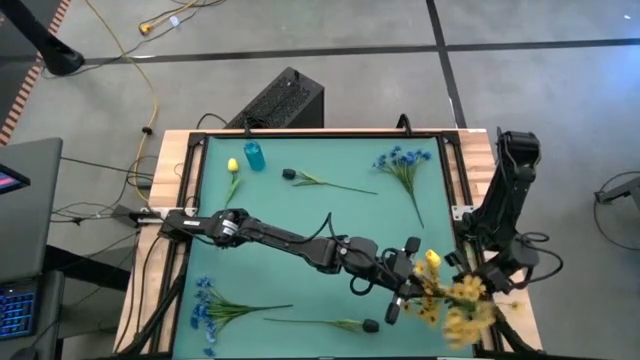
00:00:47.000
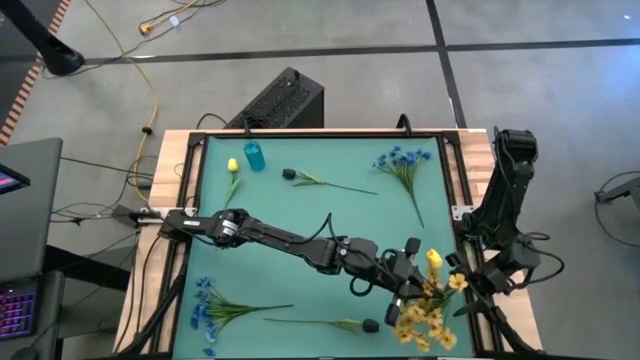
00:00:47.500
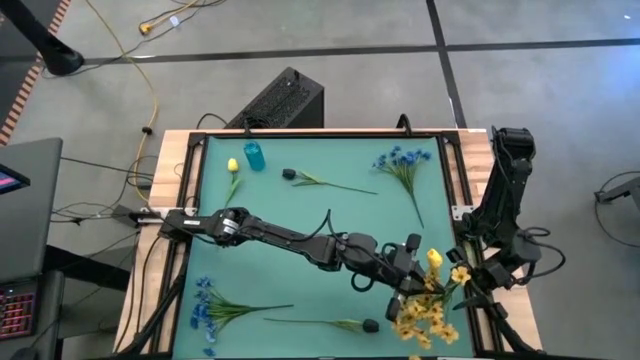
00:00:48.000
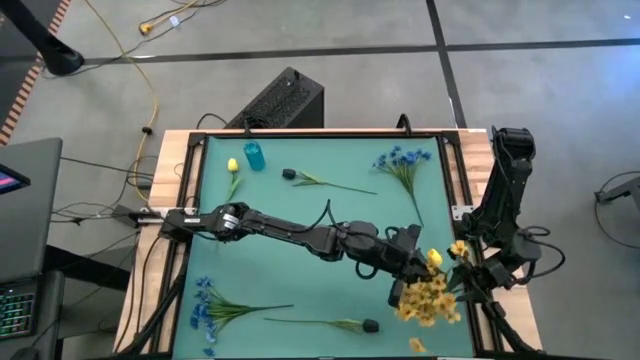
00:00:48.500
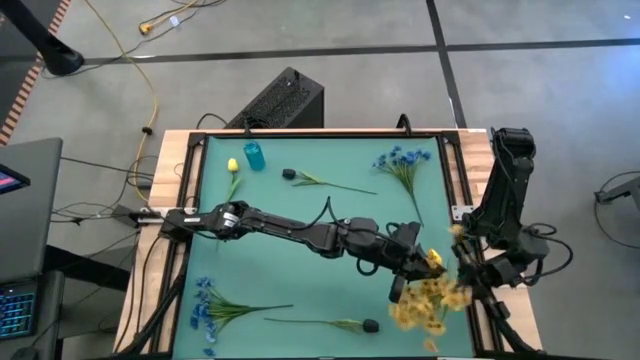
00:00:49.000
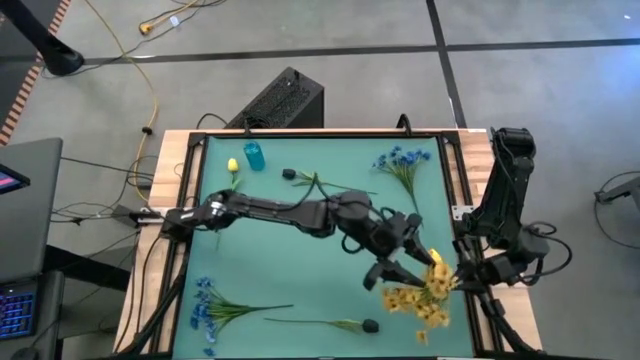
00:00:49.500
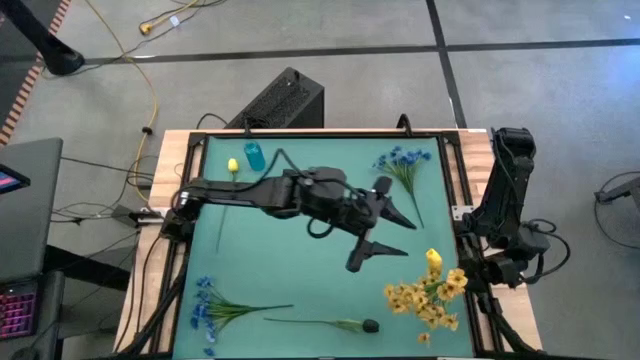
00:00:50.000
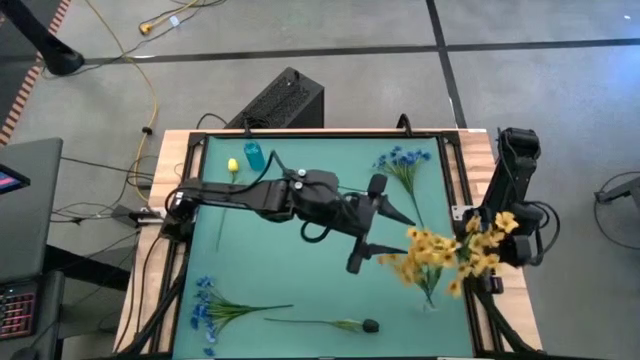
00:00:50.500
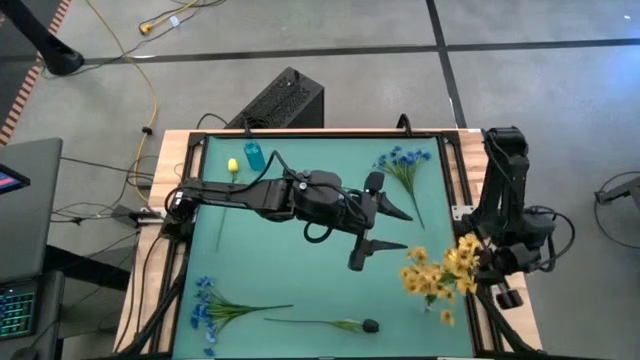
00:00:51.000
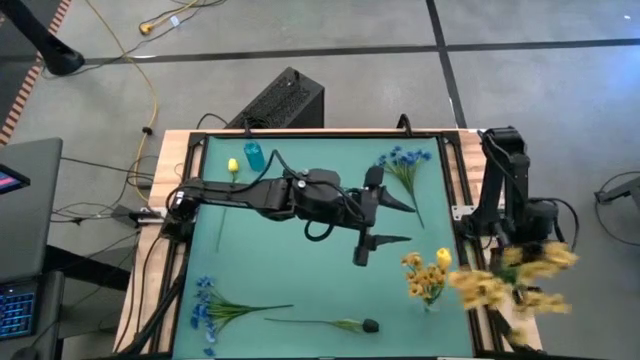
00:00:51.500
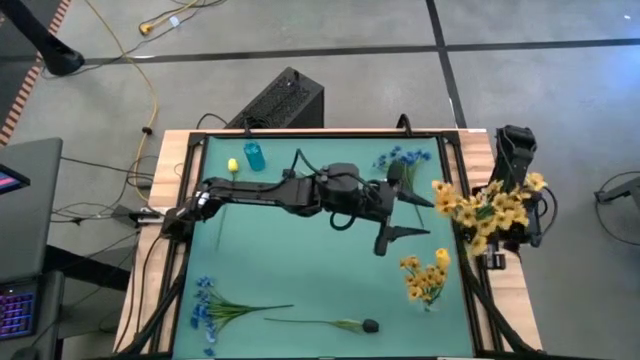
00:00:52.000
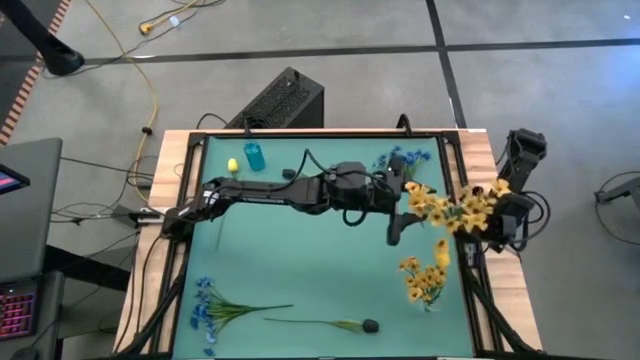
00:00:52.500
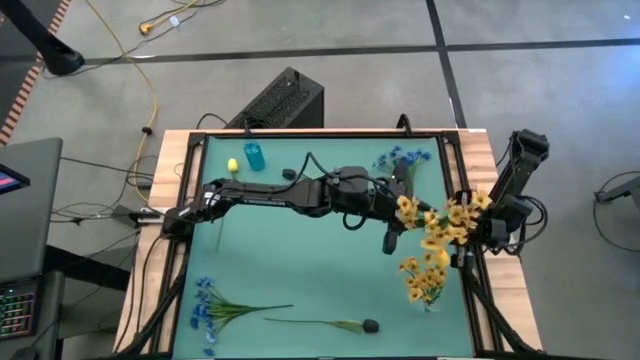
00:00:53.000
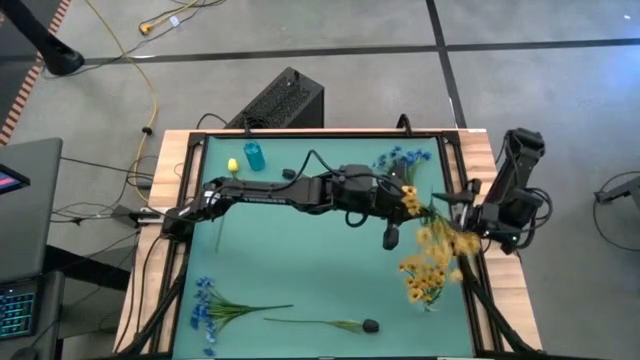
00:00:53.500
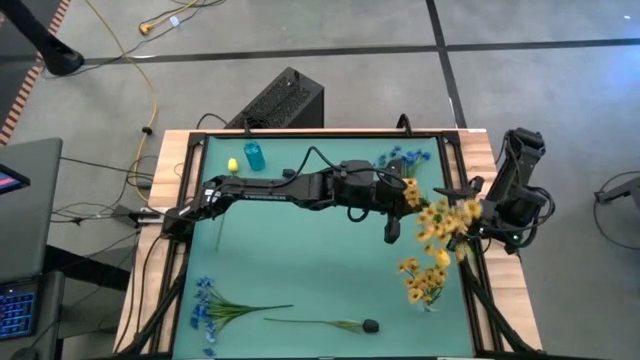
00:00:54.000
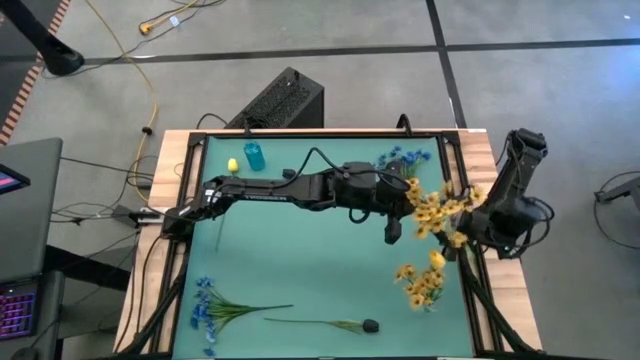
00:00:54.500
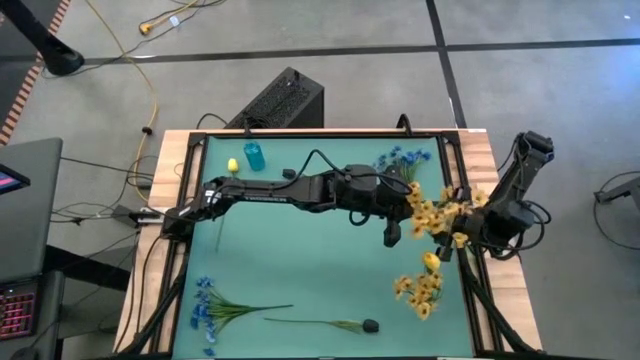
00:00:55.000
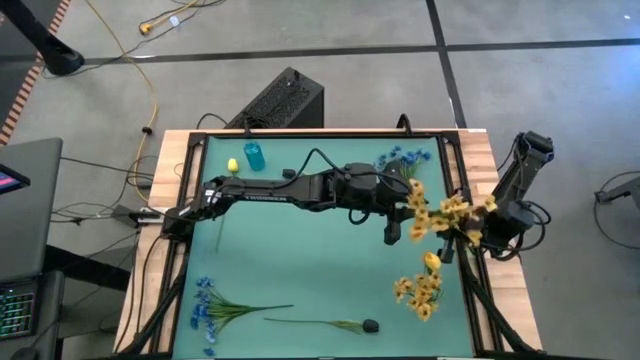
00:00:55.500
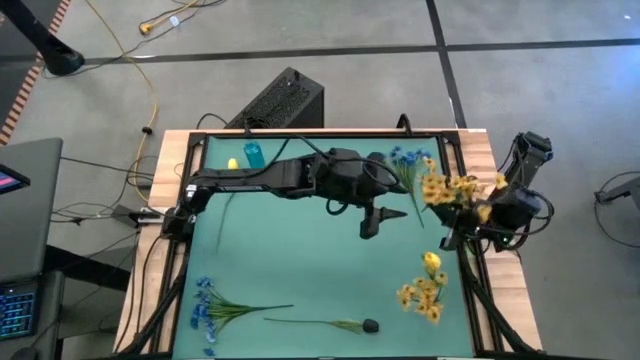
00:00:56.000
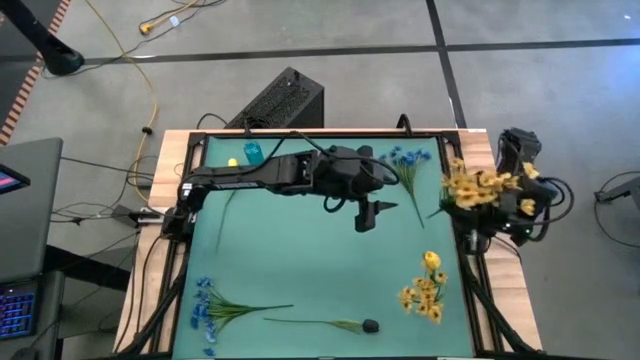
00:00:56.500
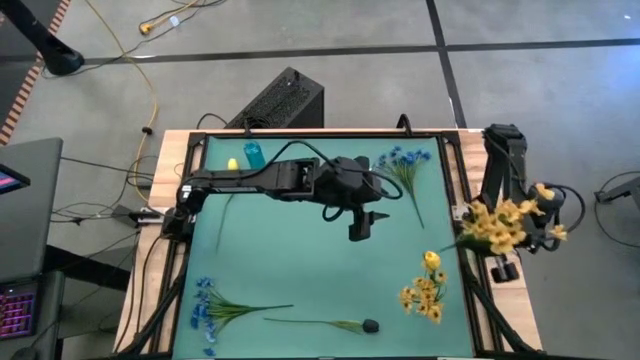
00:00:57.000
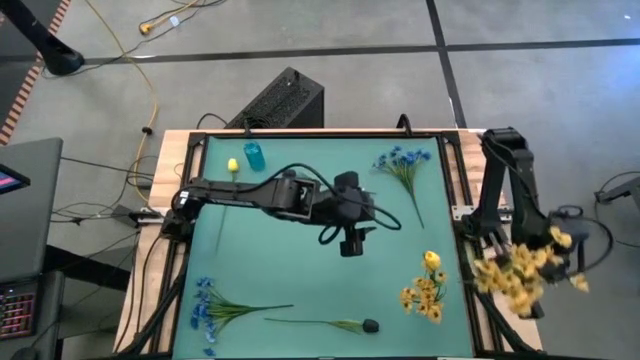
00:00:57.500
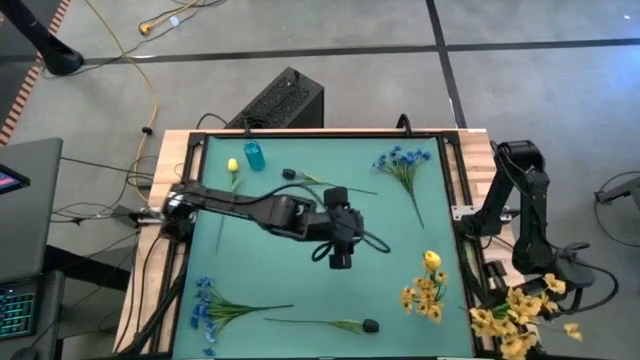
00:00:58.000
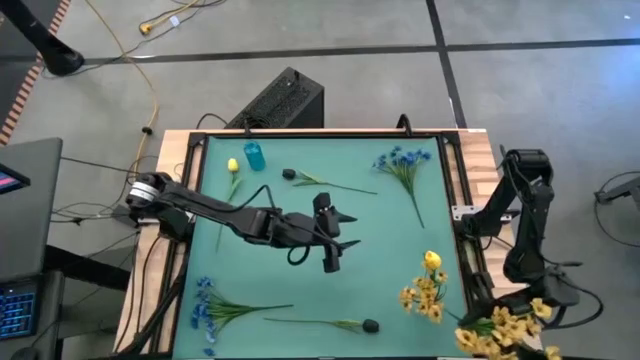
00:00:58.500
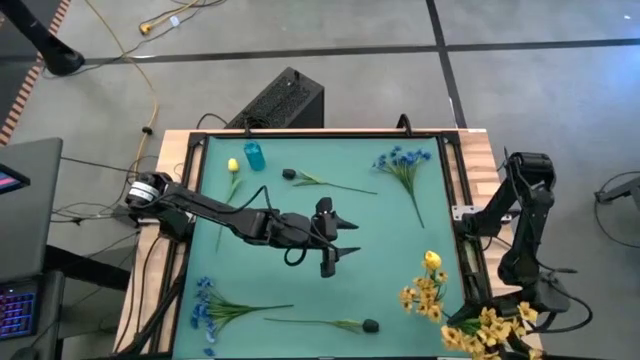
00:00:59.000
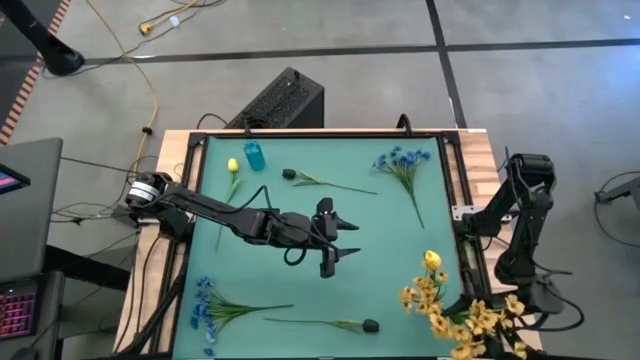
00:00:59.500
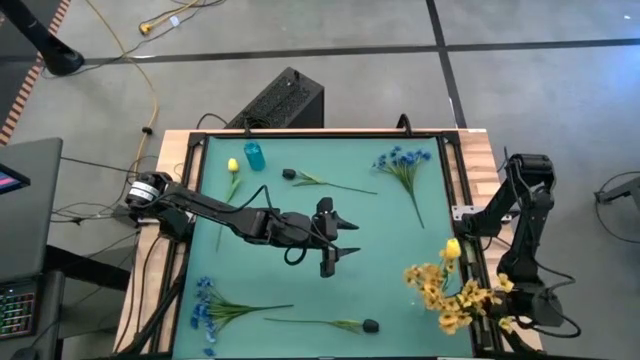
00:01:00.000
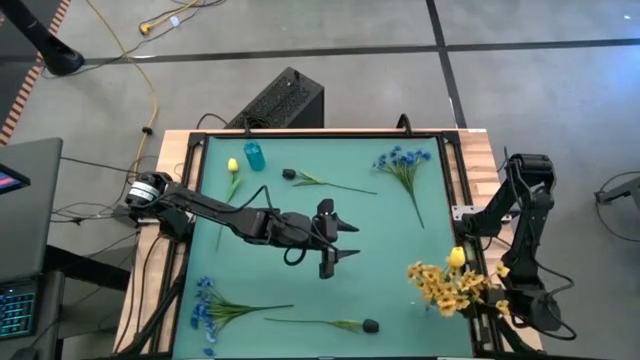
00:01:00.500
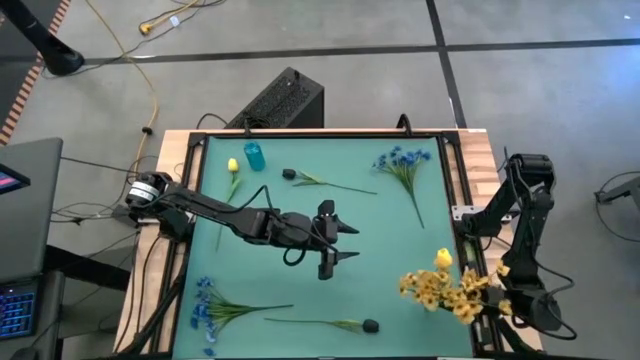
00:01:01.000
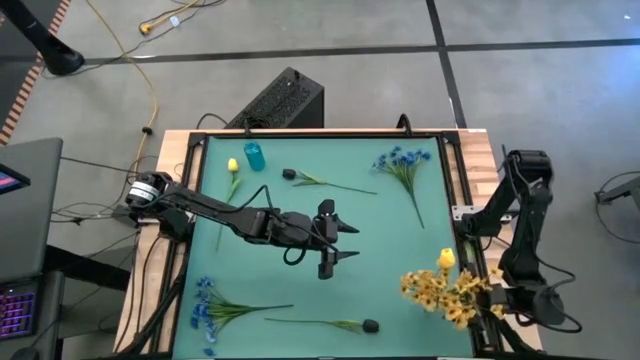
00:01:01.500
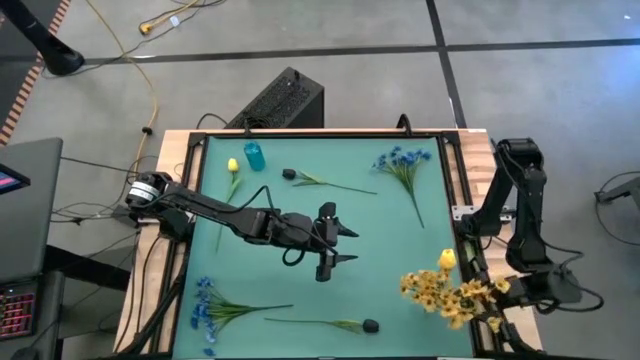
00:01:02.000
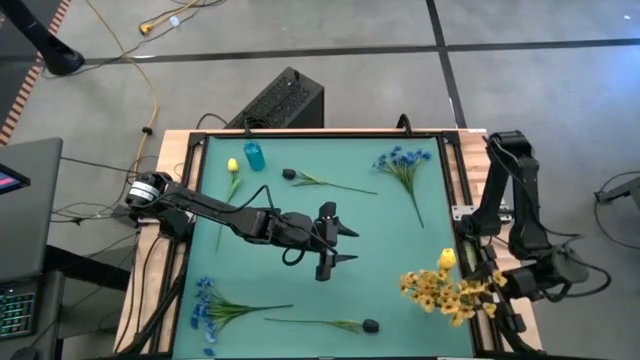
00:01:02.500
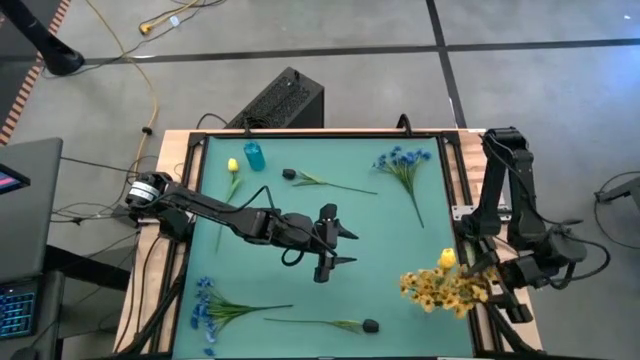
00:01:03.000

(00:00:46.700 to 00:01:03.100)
Task: Sort flowers into vase by color
Put the yellow flower into the transparent vase

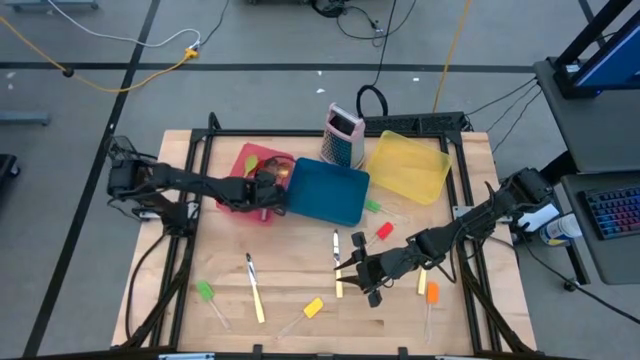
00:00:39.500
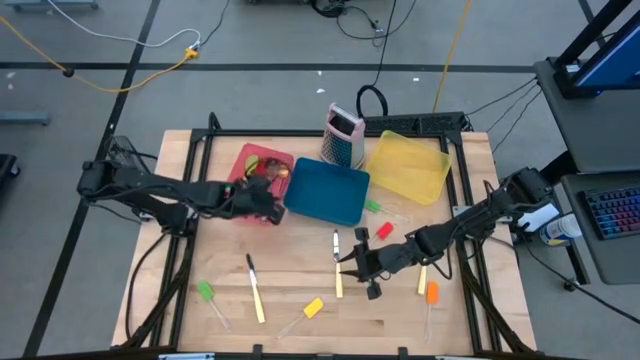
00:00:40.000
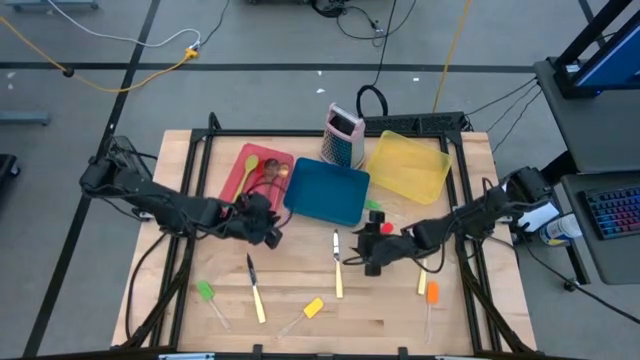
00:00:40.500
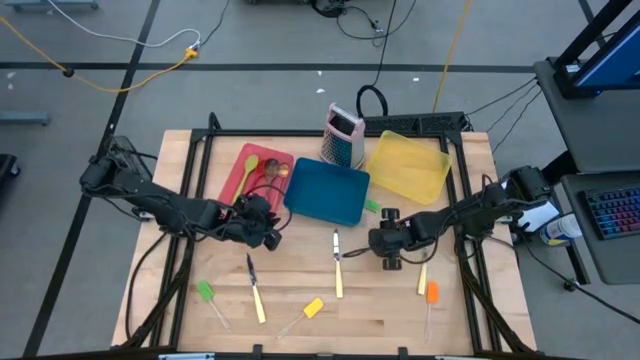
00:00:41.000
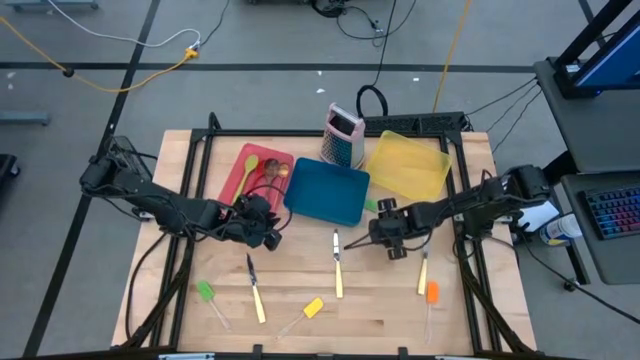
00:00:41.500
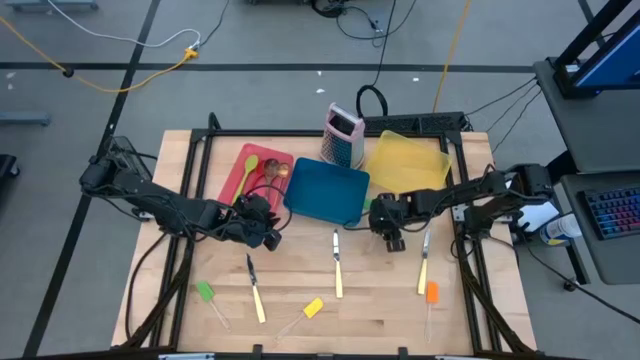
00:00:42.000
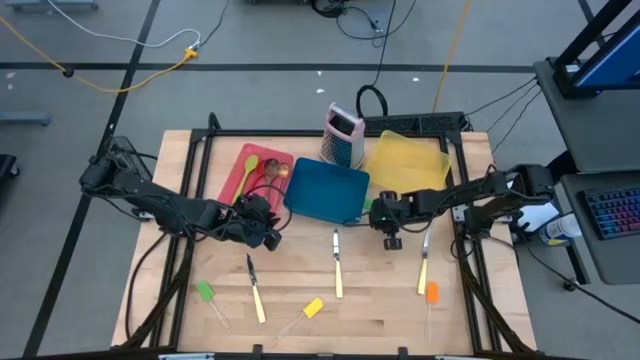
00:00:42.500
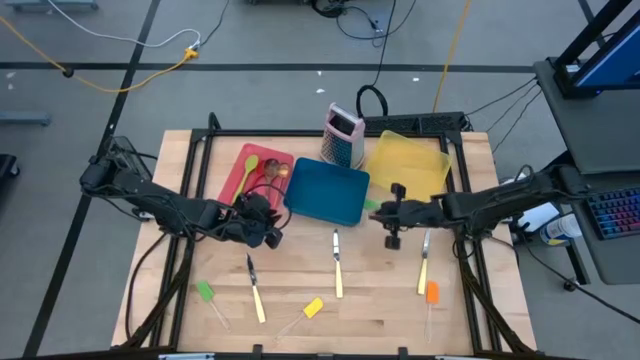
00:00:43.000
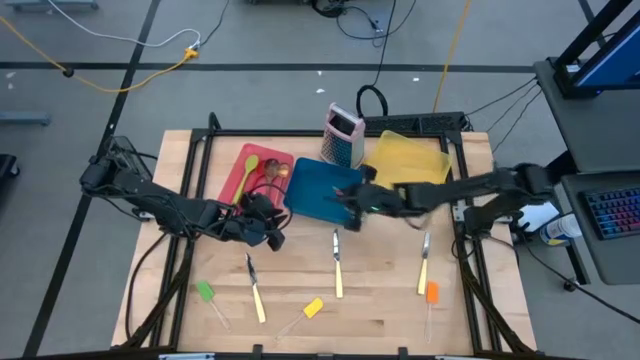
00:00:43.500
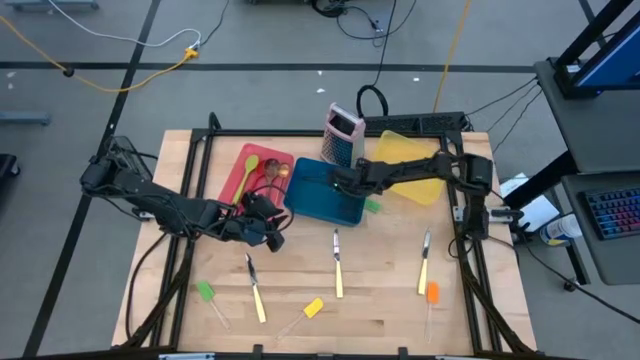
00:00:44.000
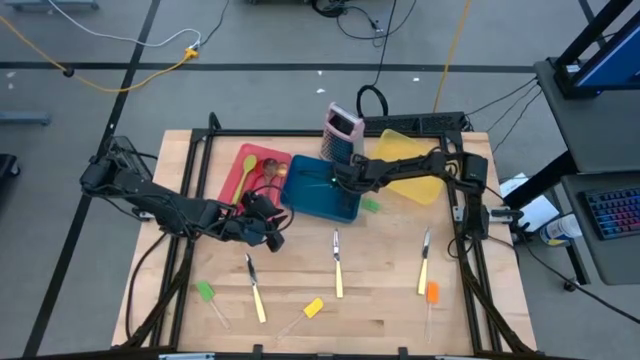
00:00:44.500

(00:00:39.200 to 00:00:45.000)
Task: Pick & Place Kitchen Items
Put the red spatula into the blue bin
